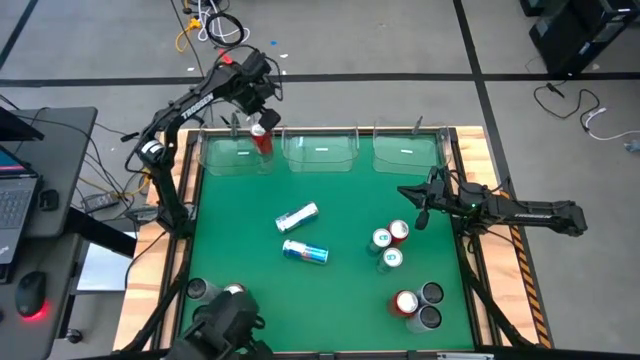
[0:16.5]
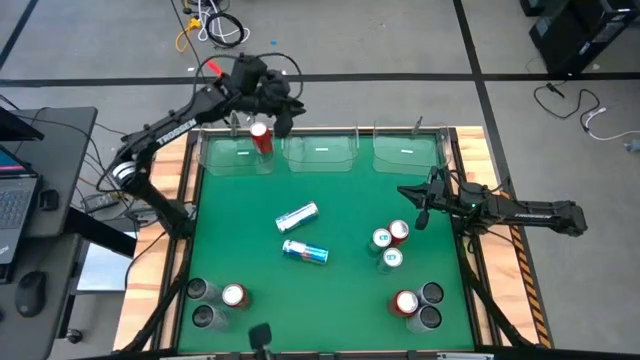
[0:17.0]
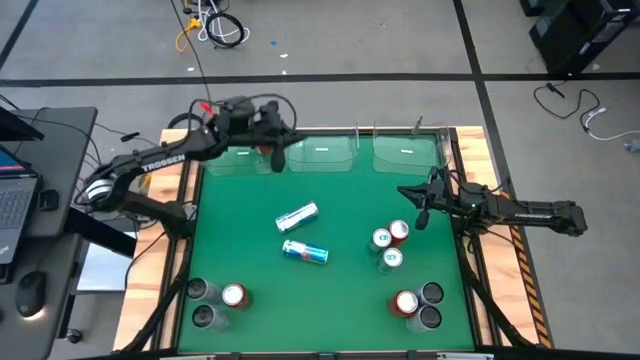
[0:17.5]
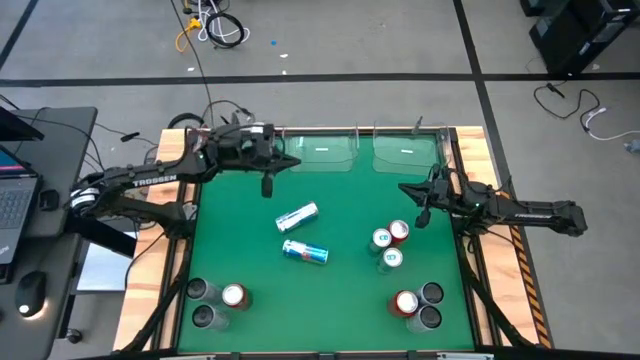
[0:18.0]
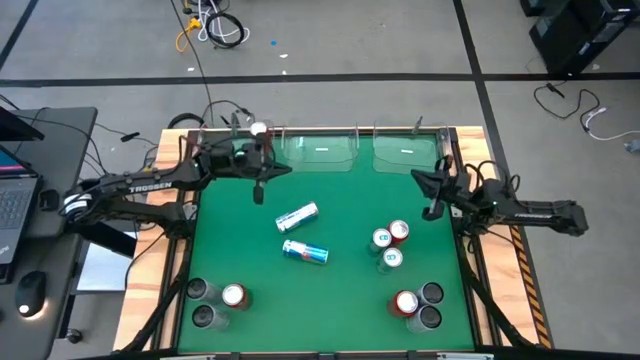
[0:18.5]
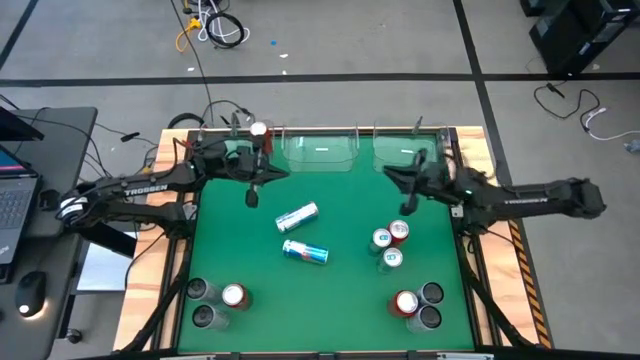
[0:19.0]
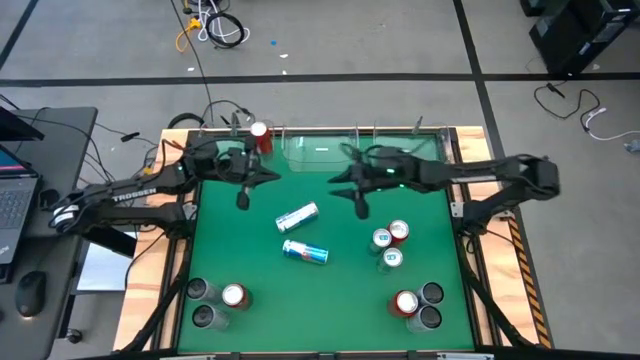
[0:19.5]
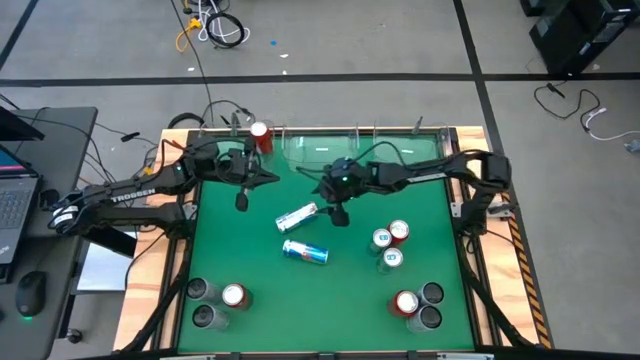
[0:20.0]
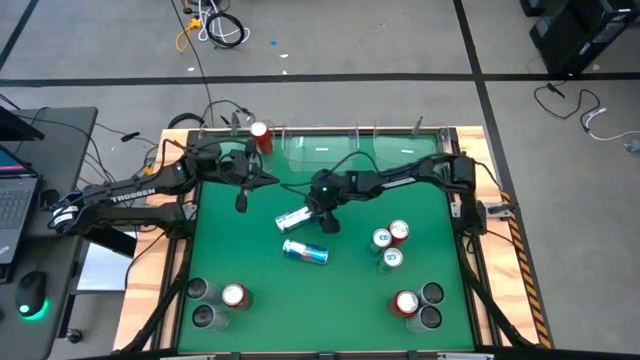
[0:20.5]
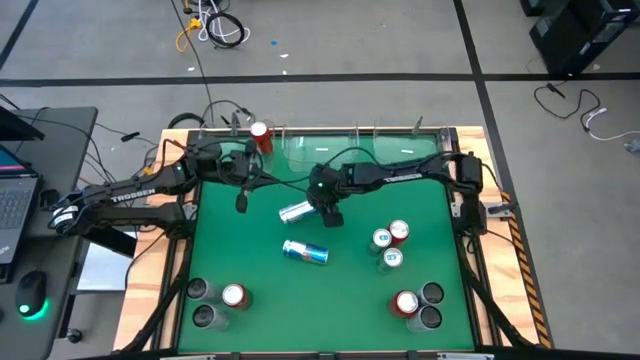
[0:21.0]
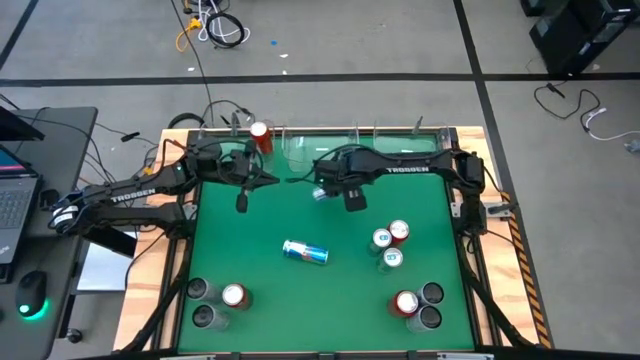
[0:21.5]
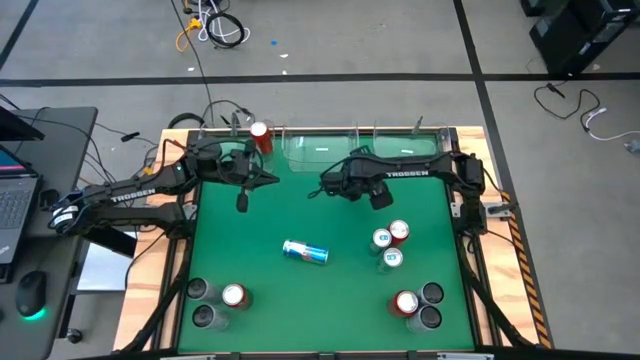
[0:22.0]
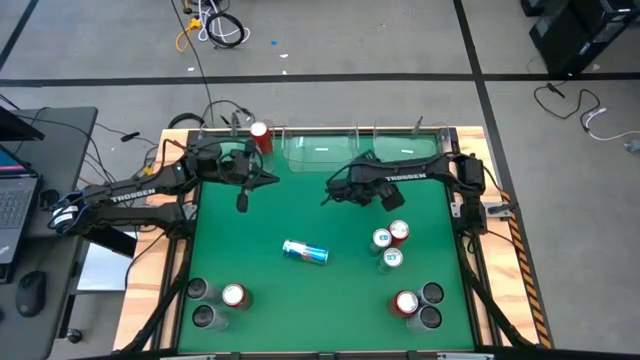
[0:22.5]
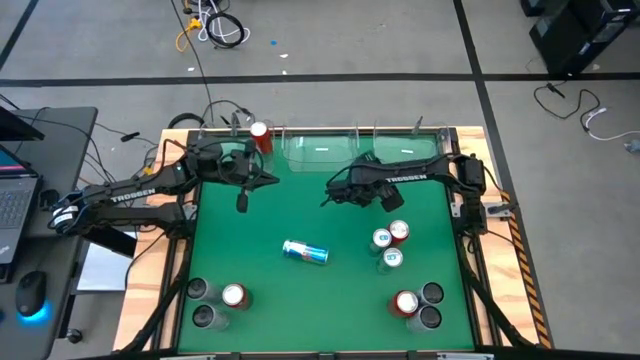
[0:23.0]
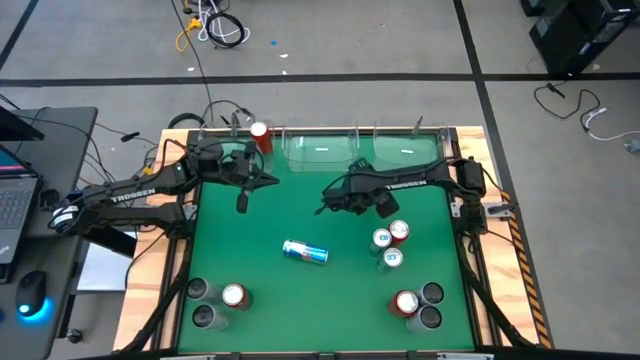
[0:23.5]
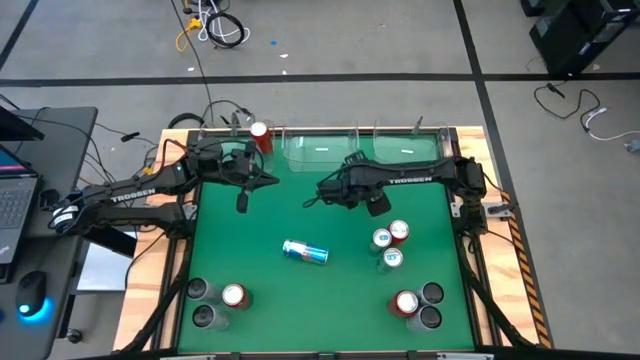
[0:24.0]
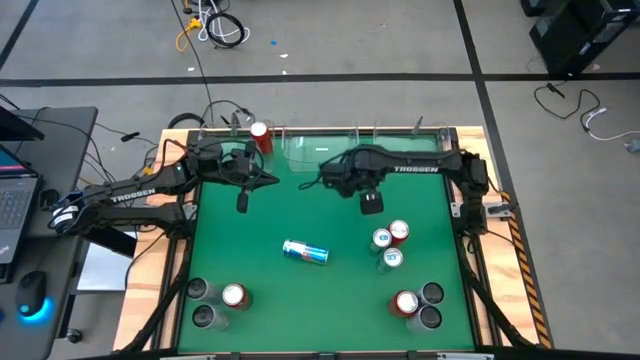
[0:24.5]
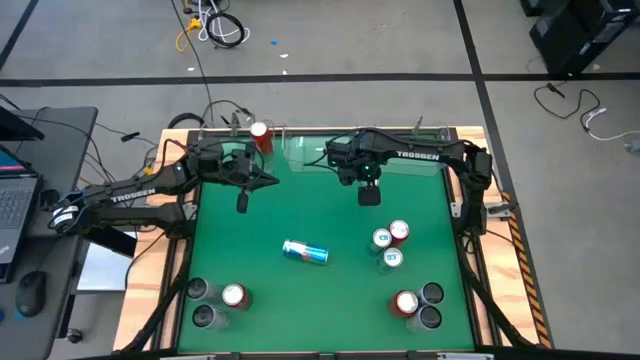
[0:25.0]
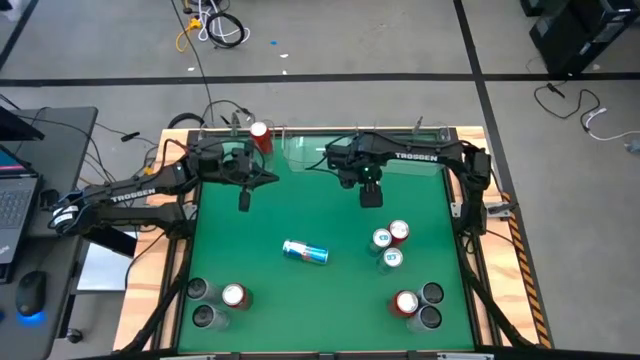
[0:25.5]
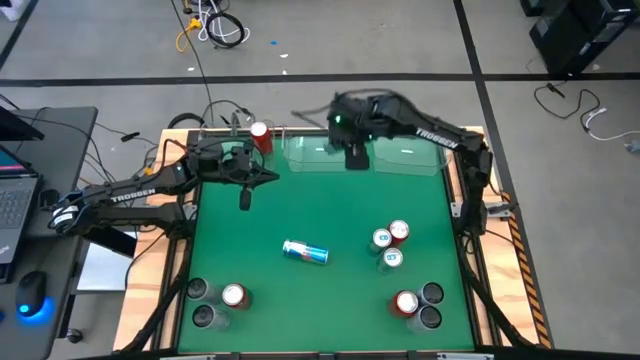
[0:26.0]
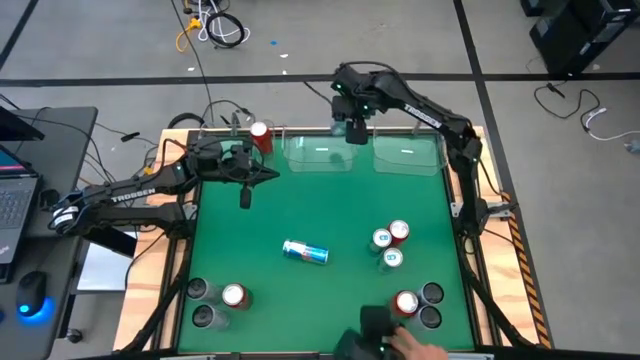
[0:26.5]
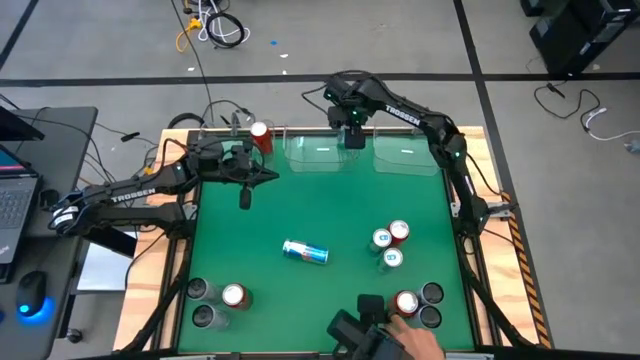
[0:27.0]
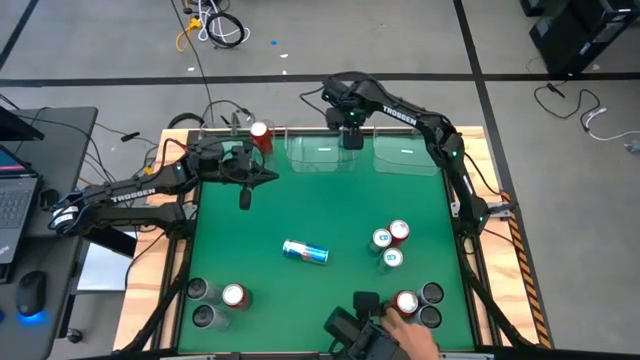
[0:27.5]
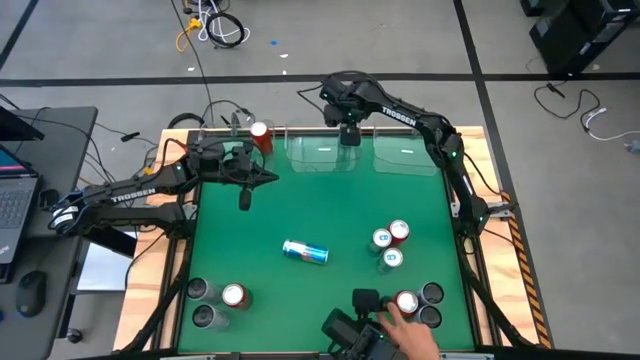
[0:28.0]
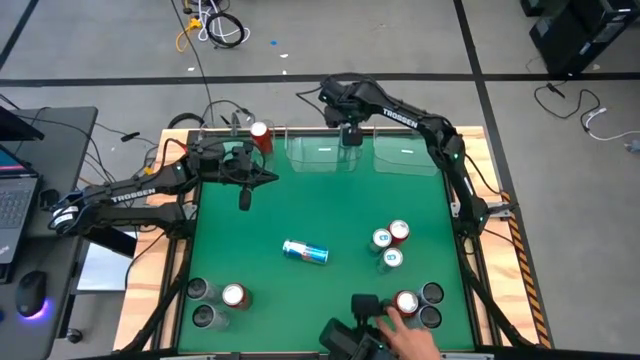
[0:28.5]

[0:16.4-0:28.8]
Task: Sort soda cans
Put the blue soda can into the transparent middle bin

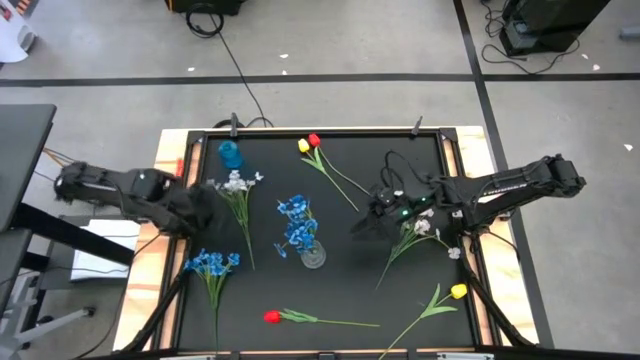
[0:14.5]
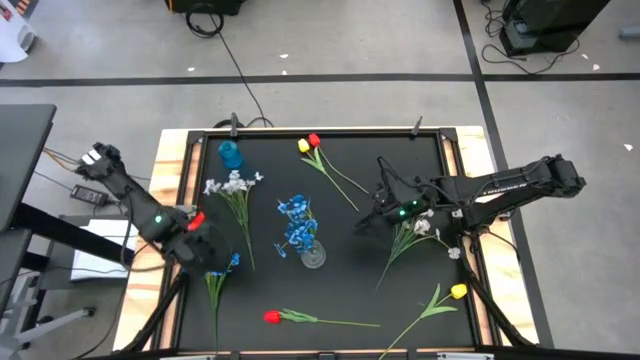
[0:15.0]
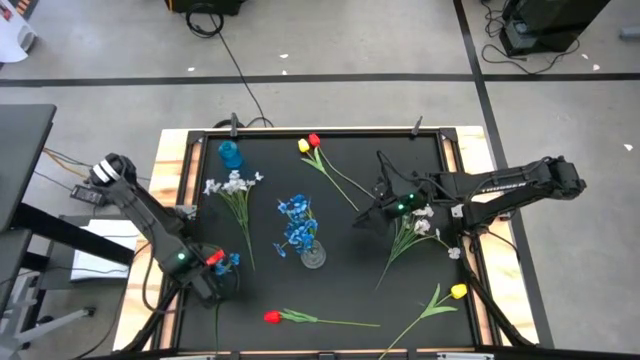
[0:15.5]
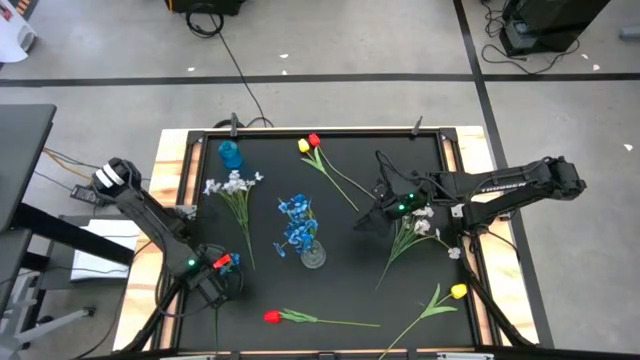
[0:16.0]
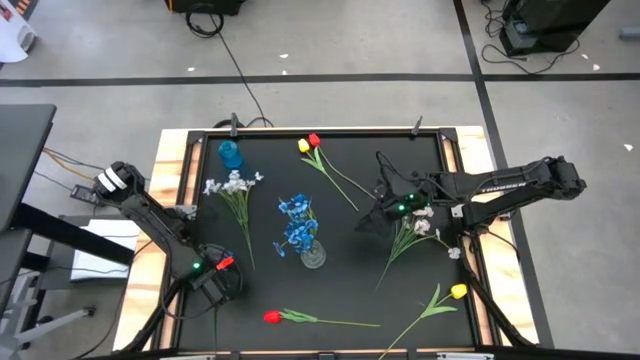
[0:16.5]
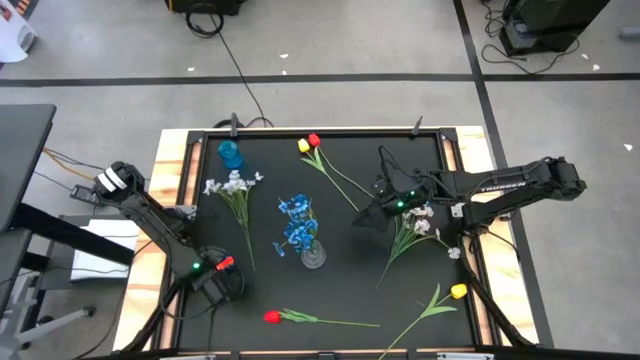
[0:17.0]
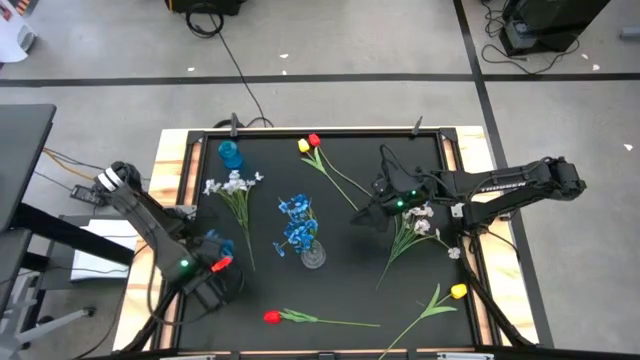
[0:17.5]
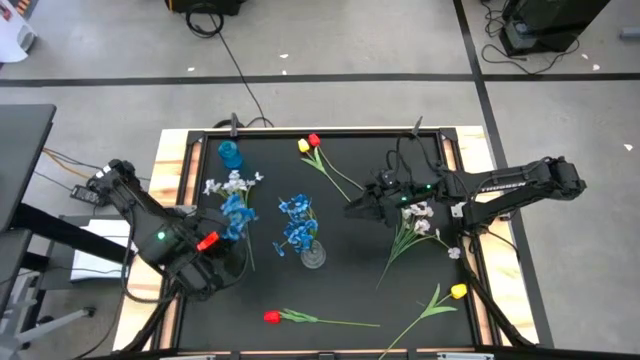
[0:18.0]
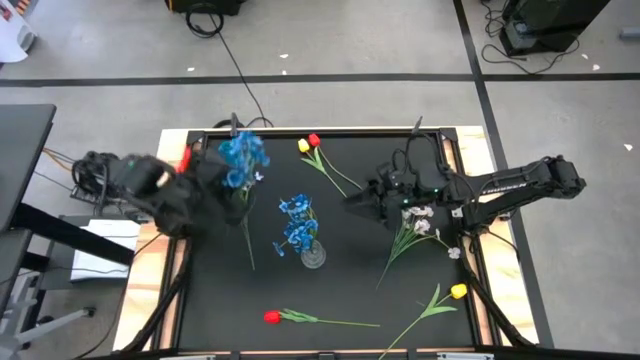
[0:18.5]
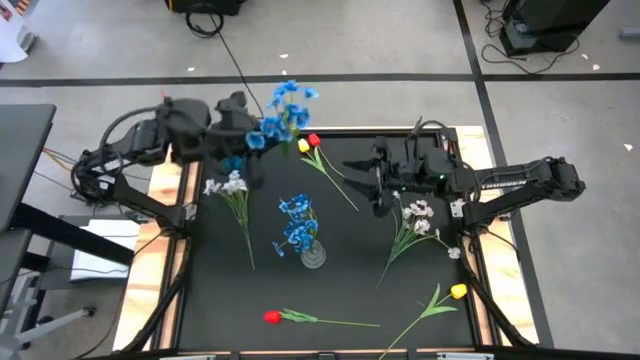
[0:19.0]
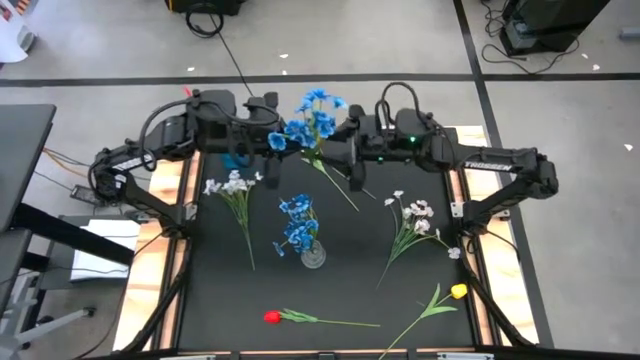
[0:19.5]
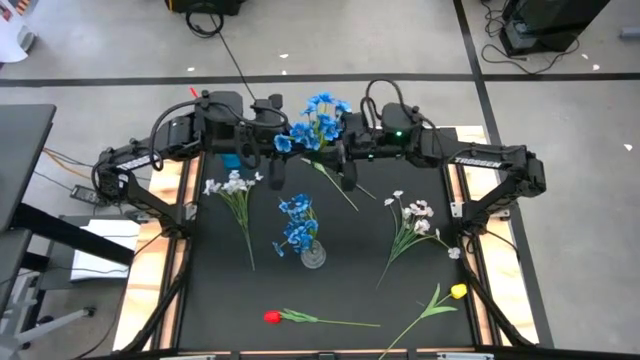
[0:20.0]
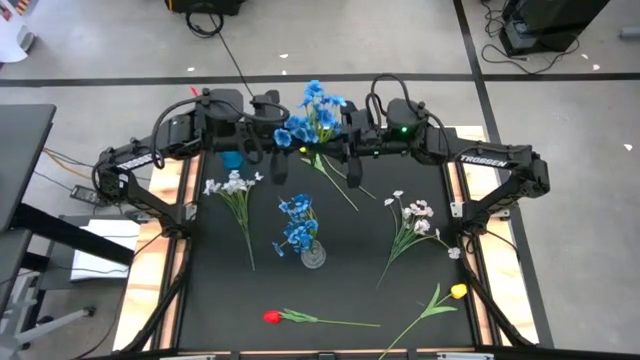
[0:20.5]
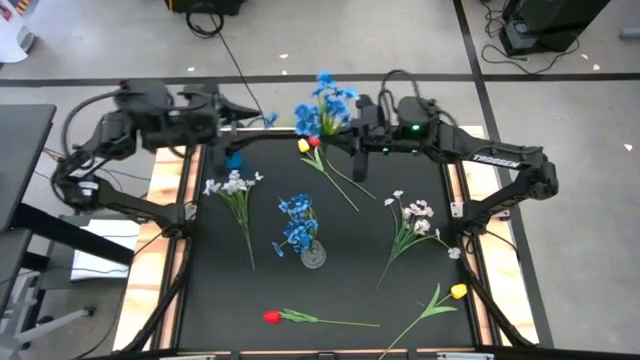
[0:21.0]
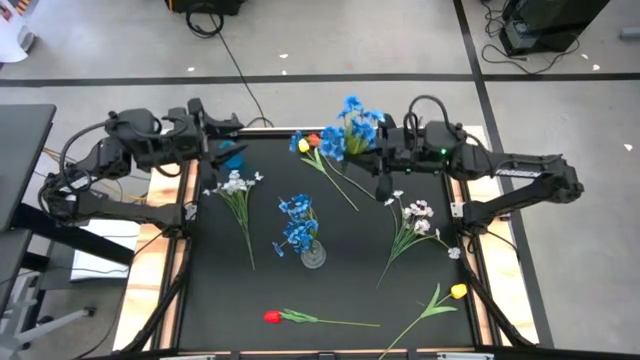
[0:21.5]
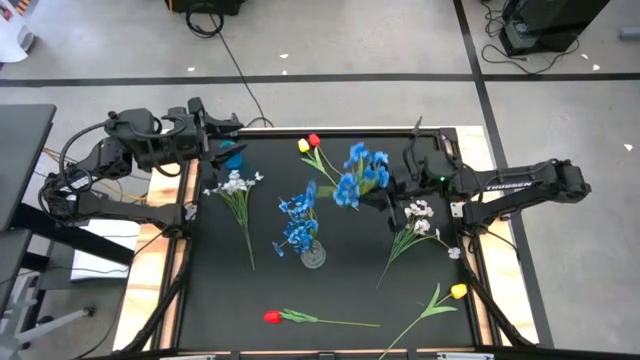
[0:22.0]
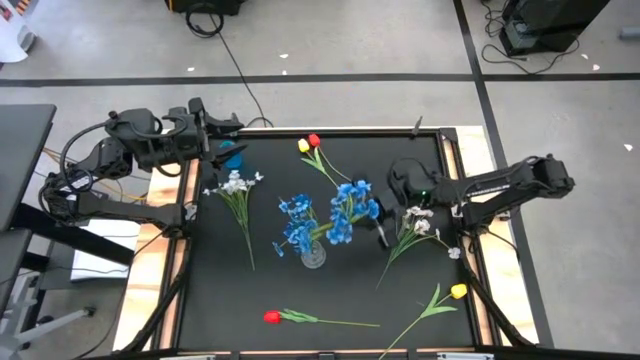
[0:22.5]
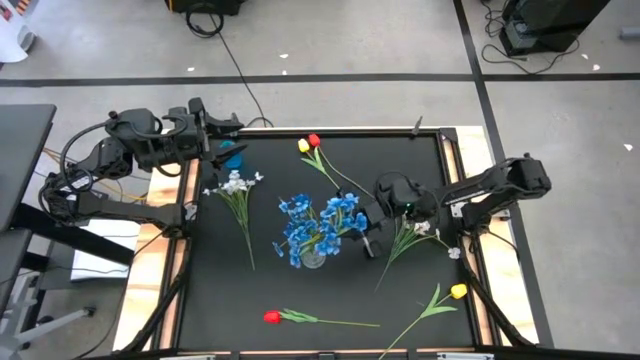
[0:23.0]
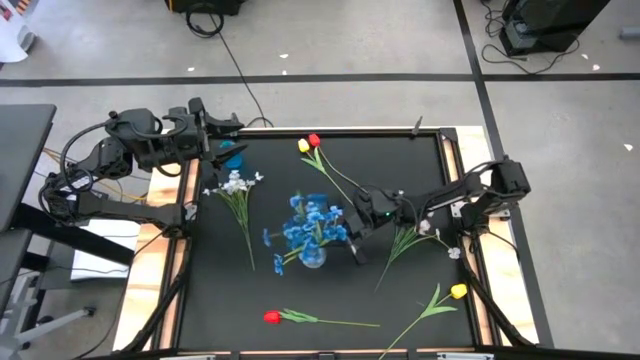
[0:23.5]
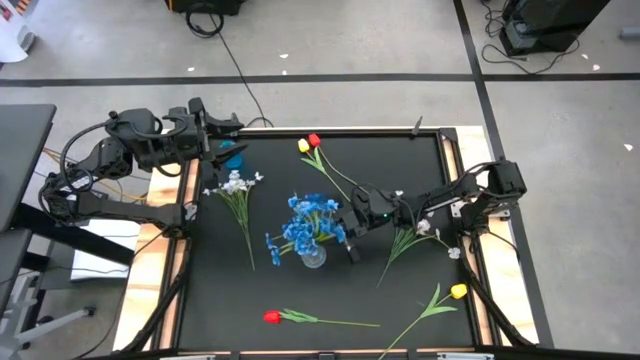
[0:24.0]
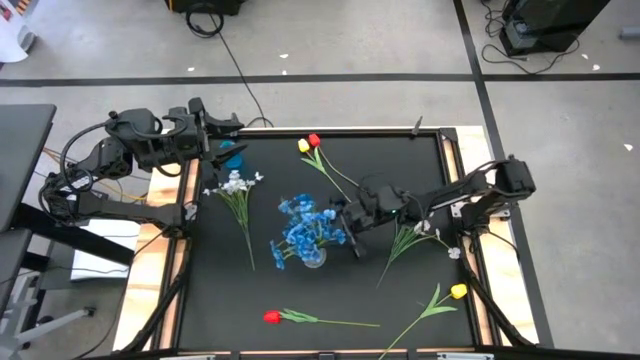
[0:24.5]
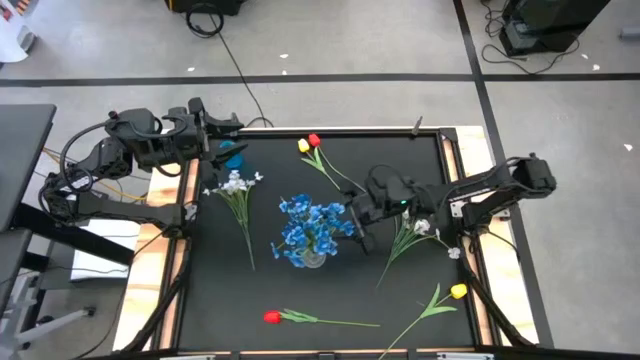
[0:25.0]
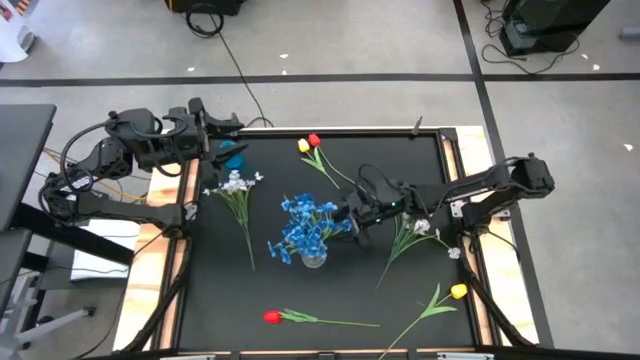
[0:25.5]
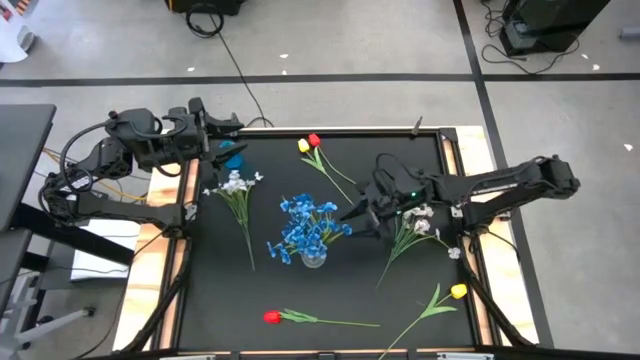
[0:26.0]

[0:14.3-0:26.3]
Task: Sort flowers into vase by color
Put the blue flower into the blue vase
